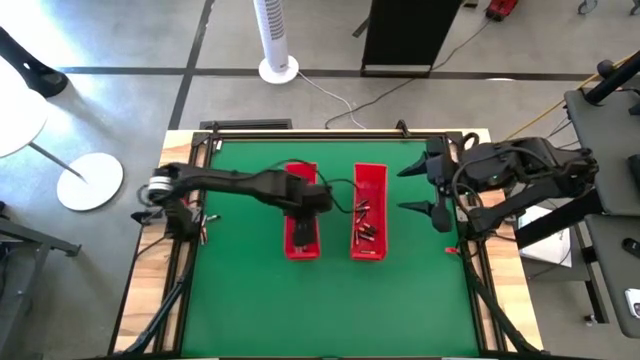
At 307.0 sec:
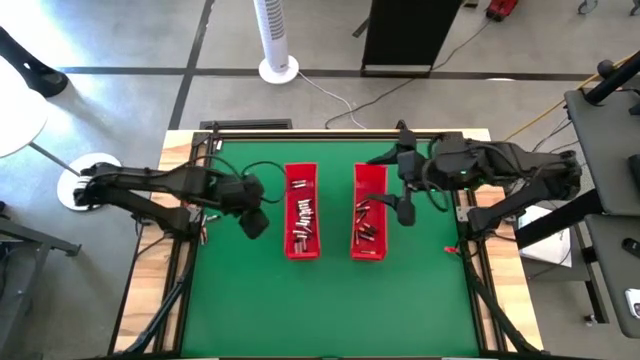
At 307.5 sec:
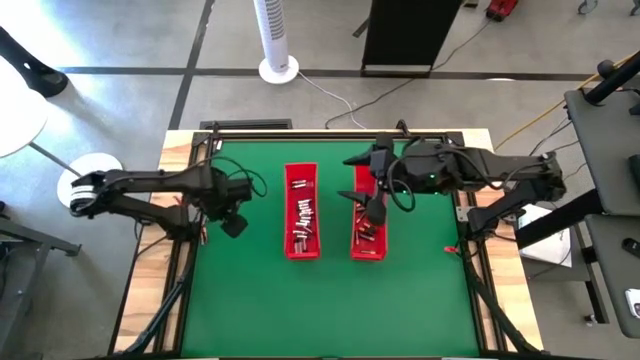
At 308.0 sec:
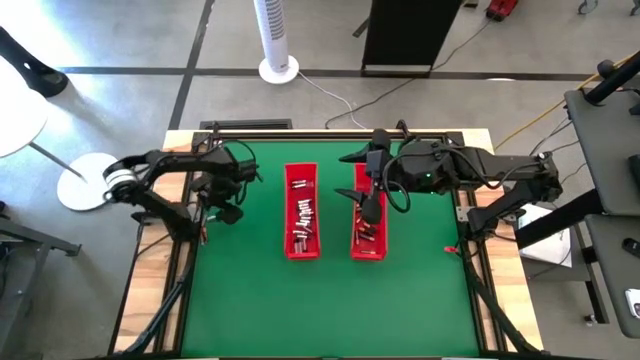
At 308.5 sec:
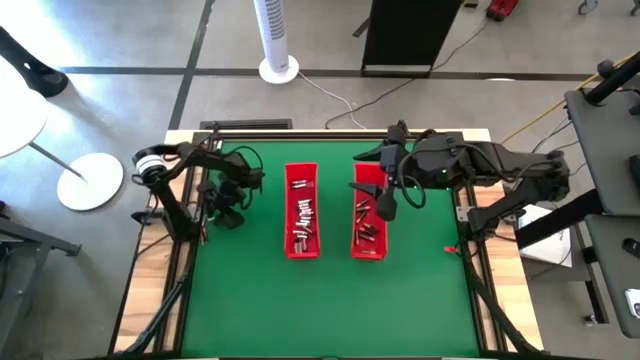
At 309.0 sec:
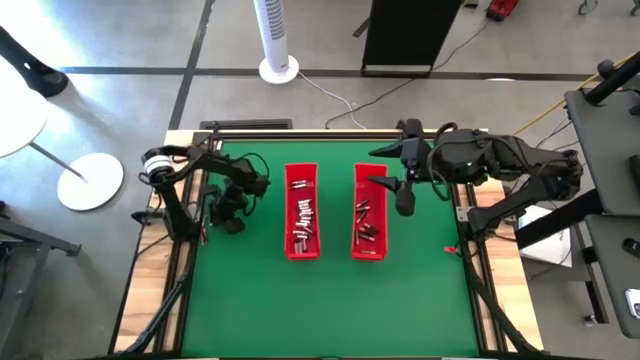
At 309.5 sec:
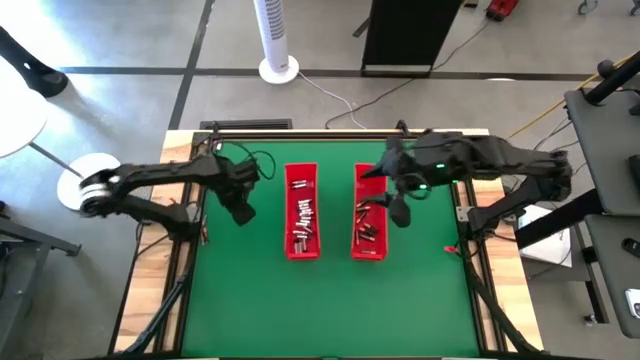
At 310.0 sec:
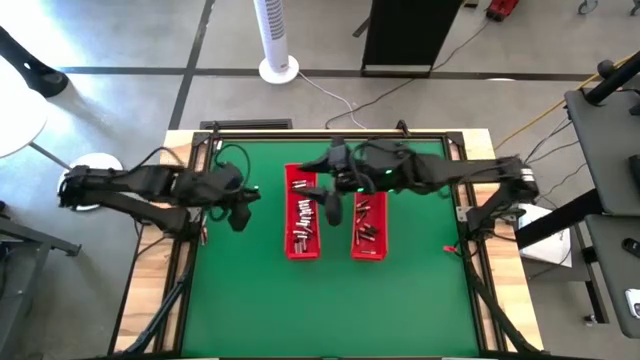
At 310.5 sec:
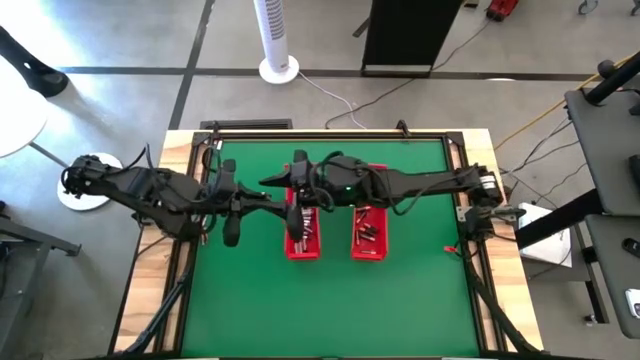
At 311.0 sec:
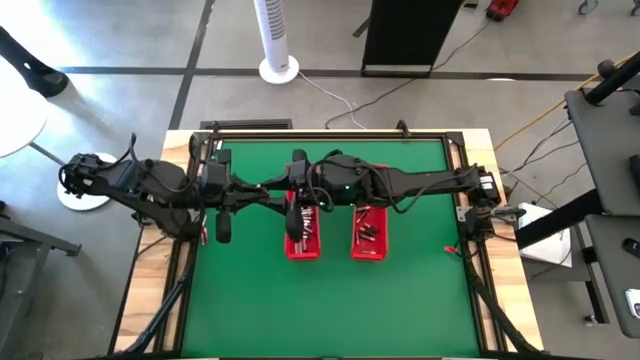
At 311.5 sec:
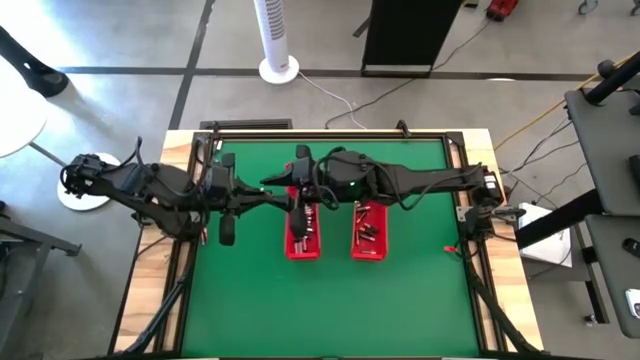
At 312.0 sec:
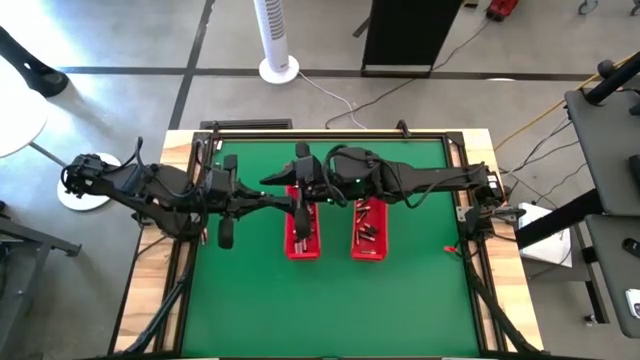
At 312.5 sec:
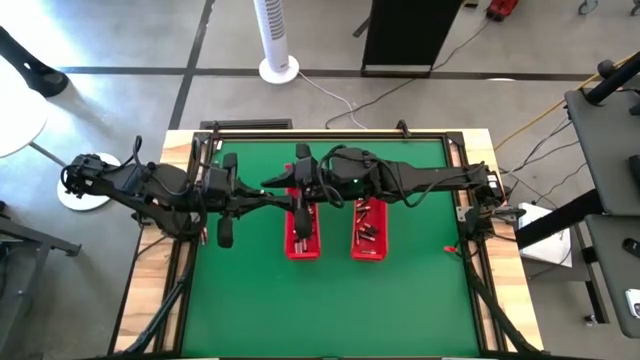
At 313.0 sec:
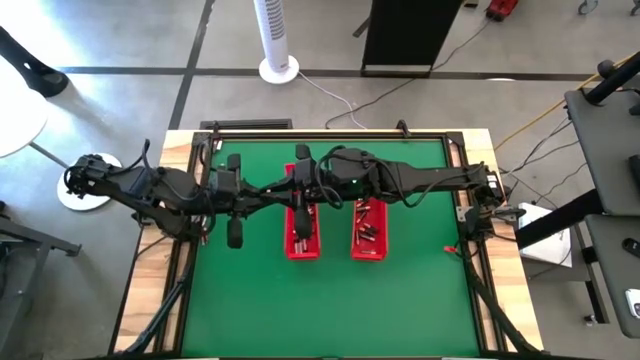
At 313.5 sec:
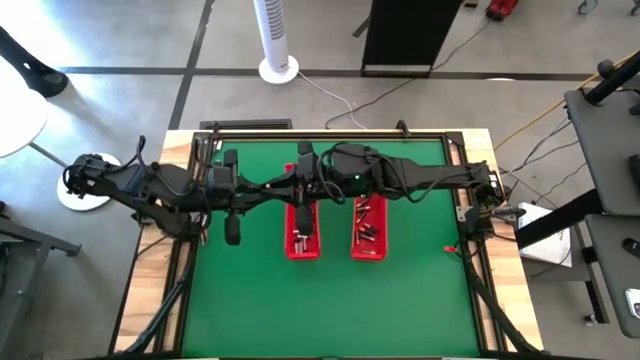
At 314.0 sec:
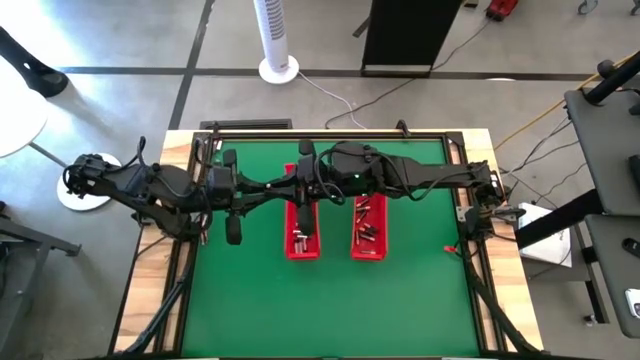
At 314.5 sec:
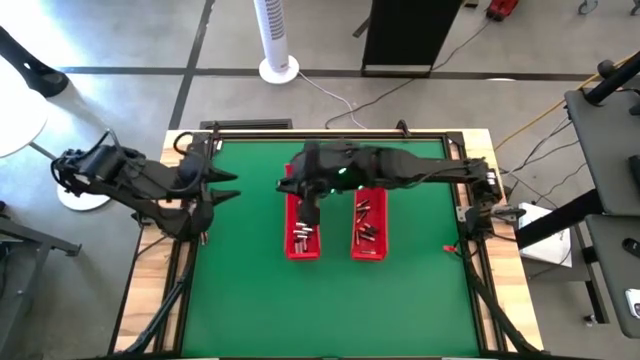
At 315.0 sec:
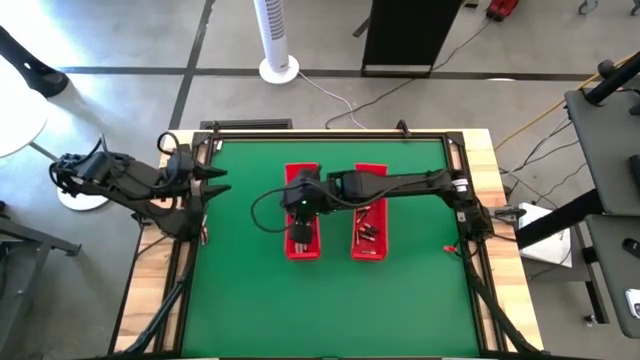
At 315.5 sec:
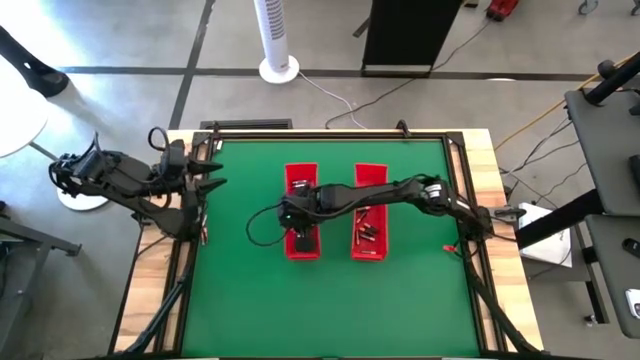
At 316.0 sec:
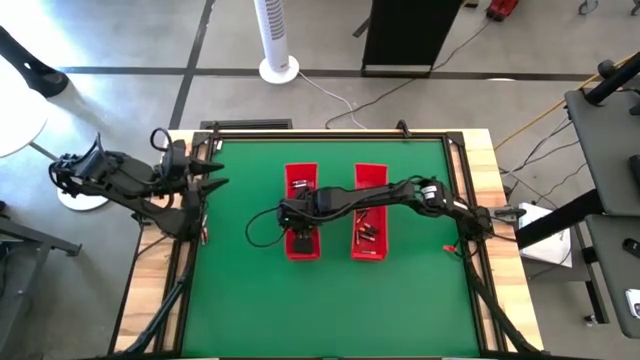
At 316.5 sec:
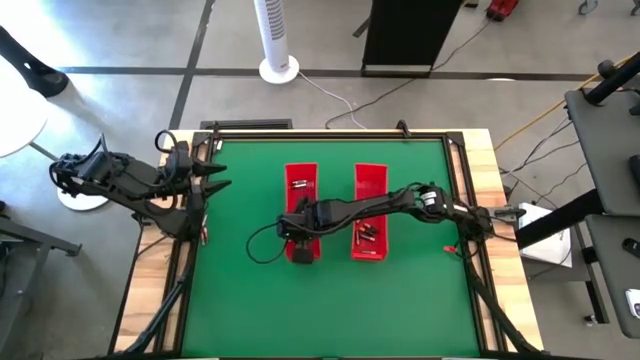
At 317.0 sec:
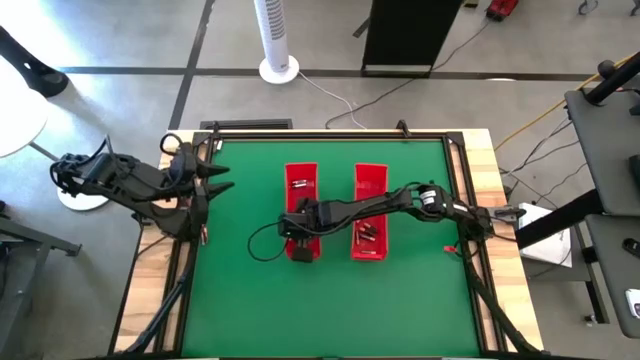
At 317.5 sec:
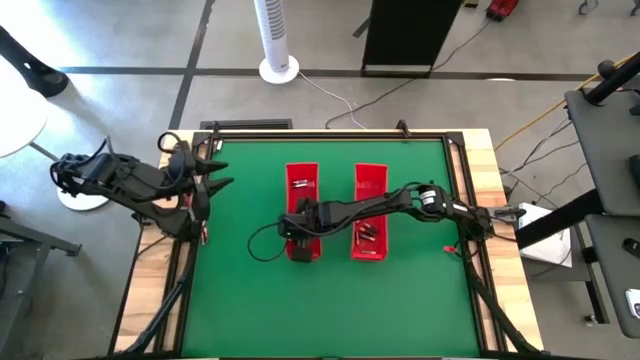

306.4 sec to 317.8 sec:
Task: Sort batteries
Put the silver battery into the left red bin

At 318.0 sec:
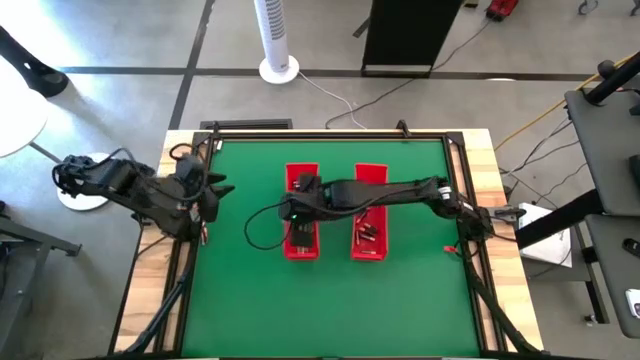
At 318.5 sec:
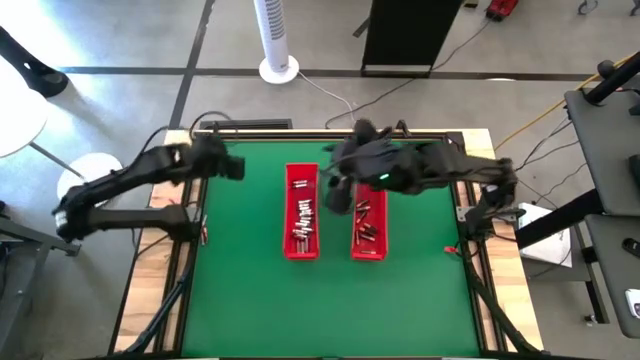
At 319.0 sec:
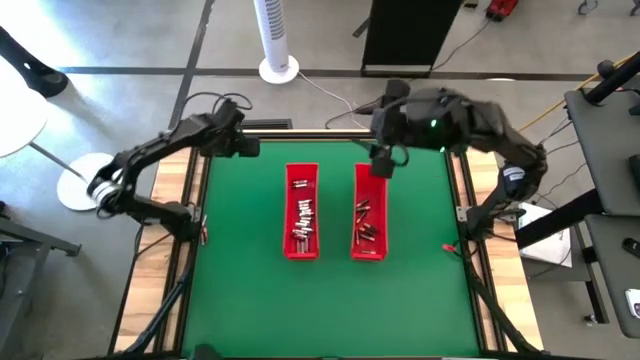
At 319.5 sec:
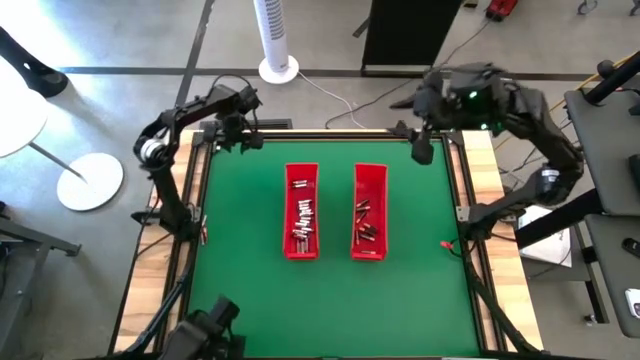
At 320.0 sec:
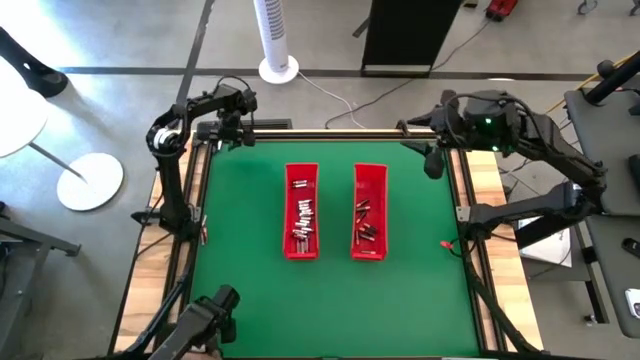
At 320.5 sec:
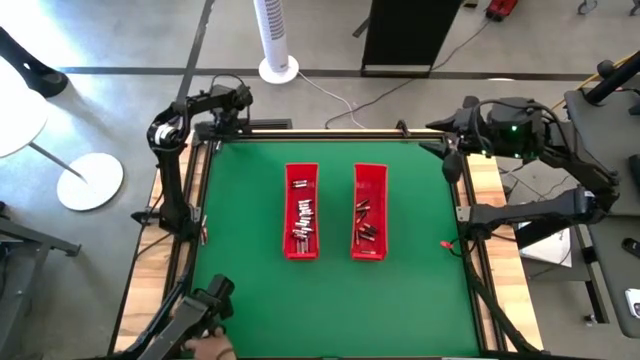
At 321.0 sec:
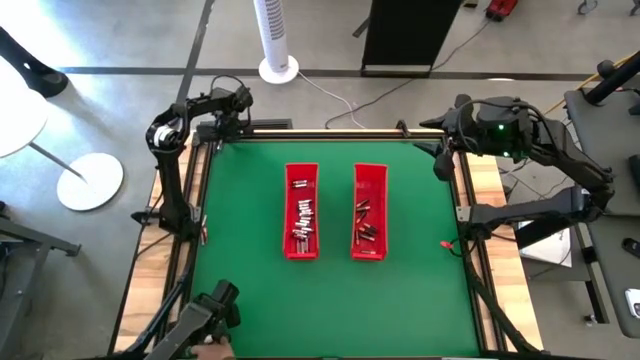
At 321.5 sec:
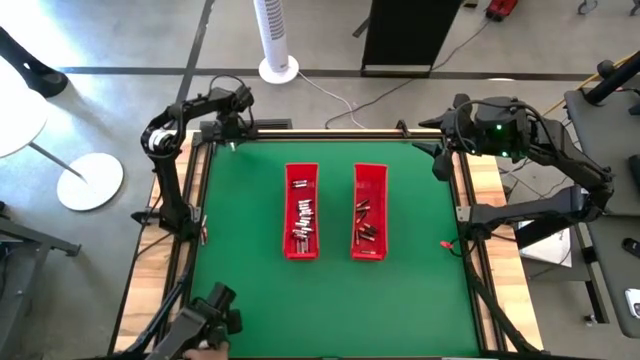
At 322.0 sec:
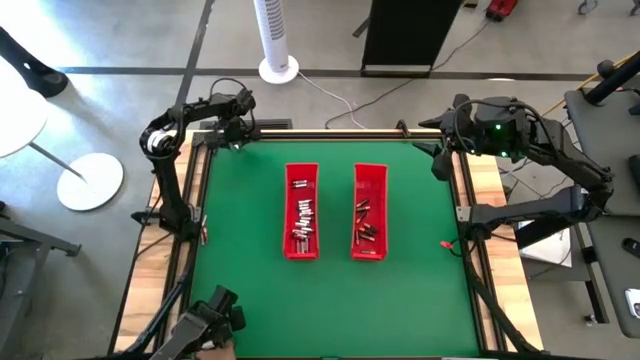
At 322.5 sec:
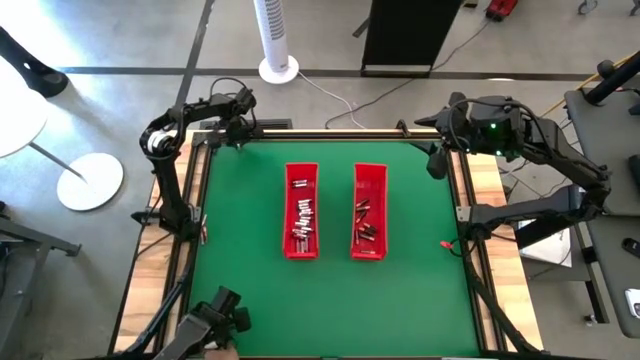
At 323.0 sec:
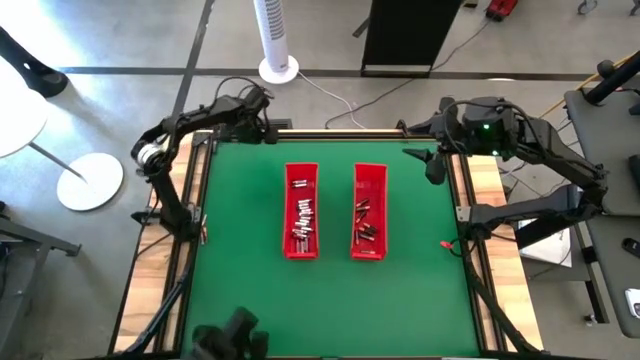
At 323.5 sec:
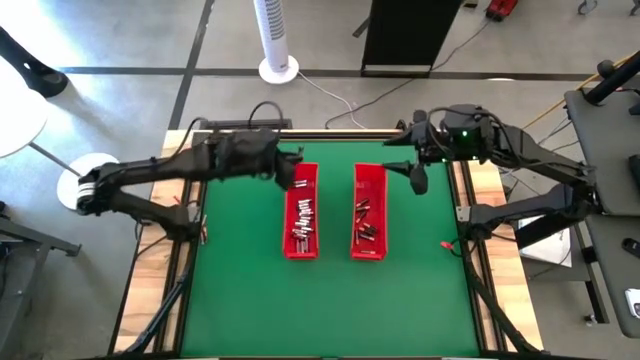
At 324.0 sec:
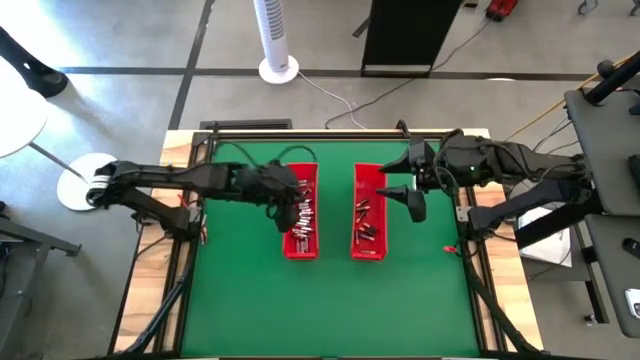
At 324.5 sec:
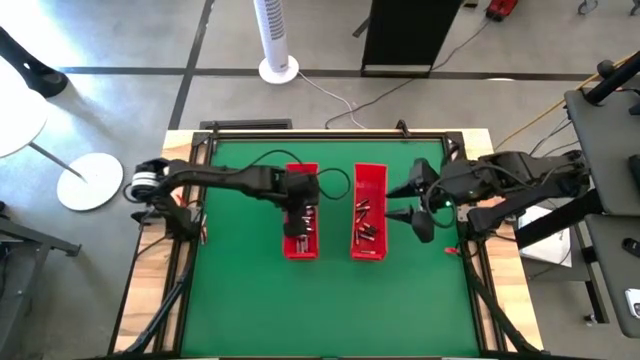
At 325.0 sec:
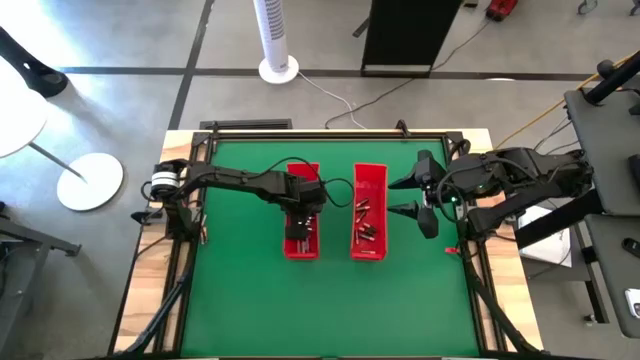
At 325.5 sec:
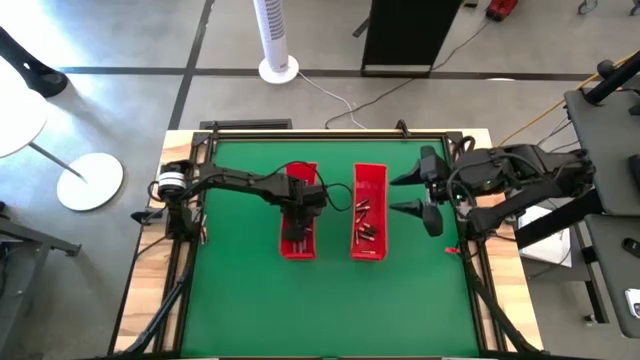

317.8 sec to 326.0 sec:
Put the silver battery into the left red bin
